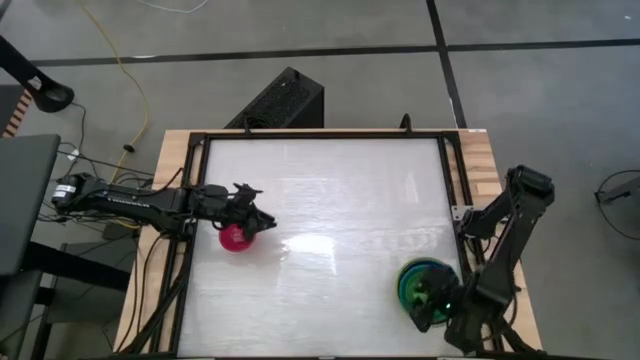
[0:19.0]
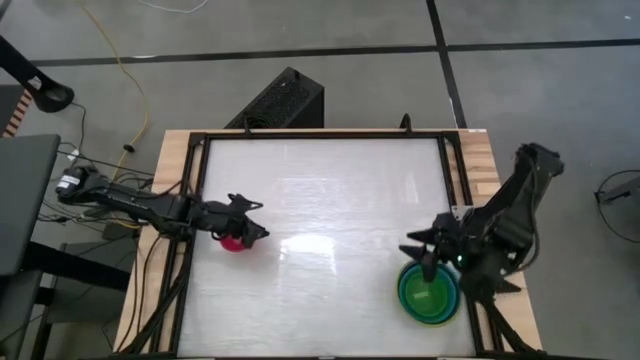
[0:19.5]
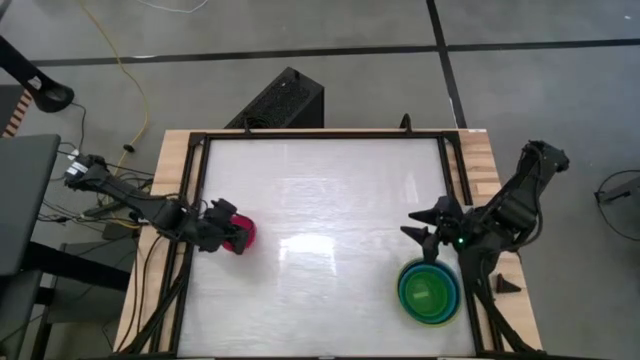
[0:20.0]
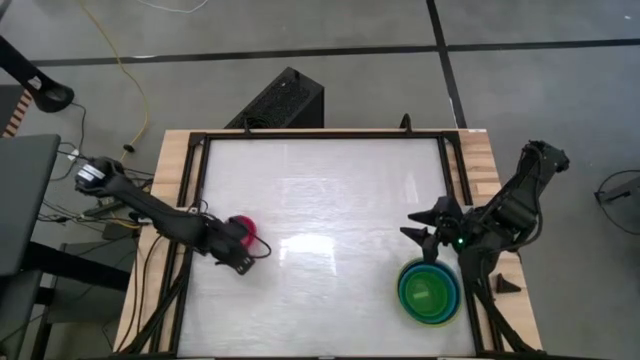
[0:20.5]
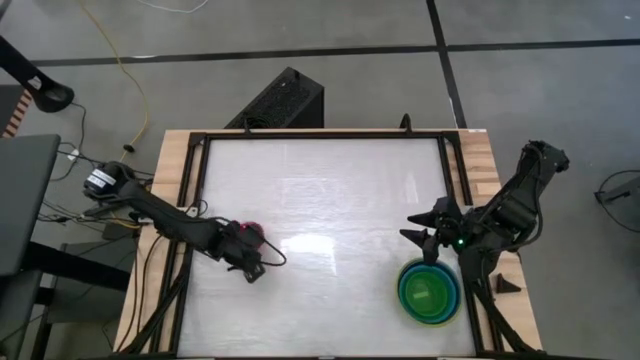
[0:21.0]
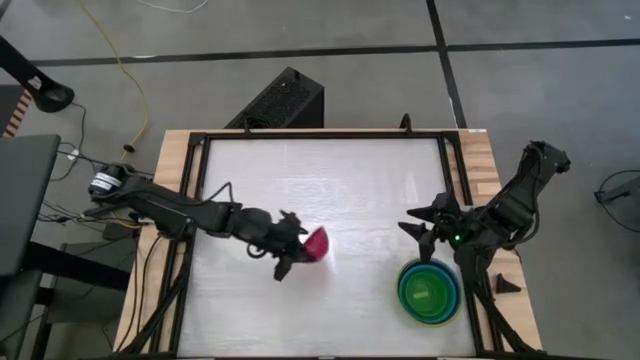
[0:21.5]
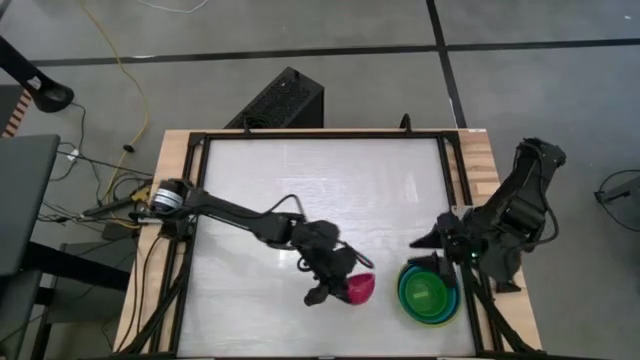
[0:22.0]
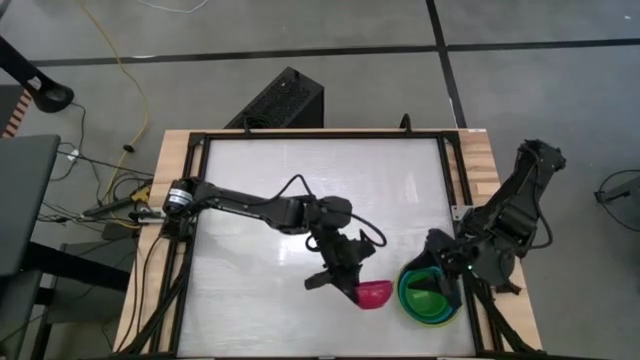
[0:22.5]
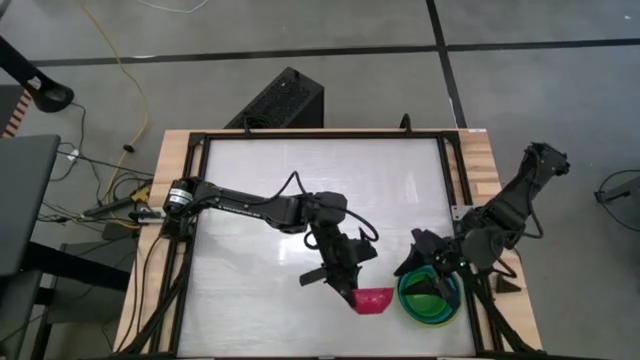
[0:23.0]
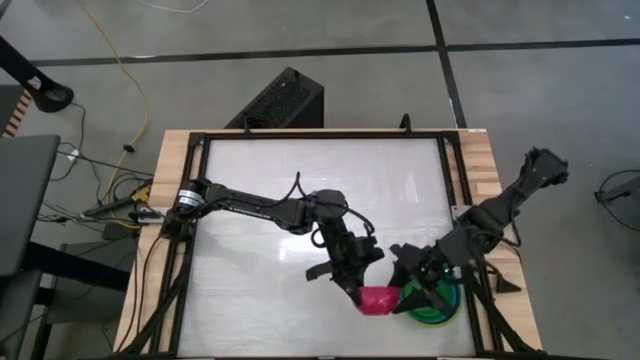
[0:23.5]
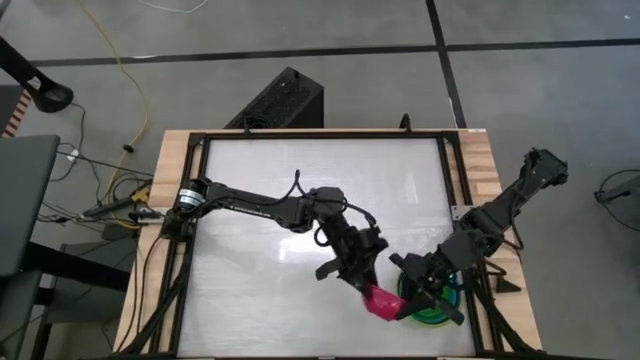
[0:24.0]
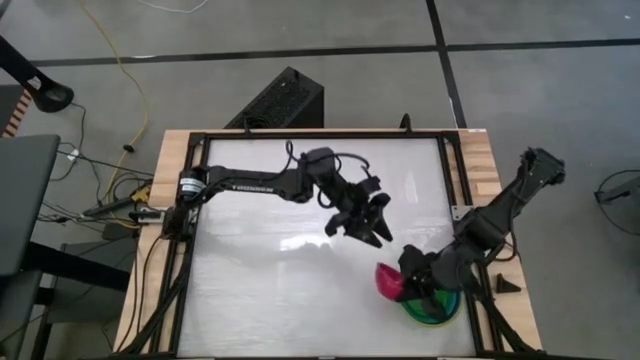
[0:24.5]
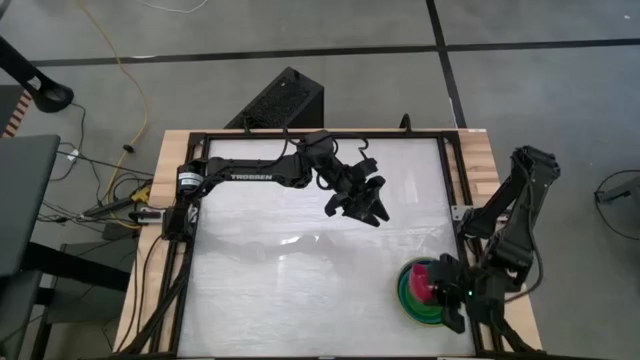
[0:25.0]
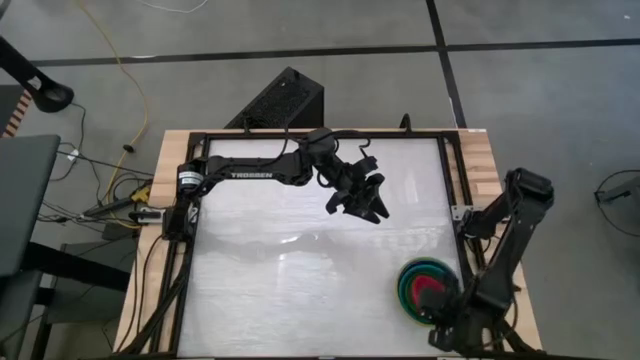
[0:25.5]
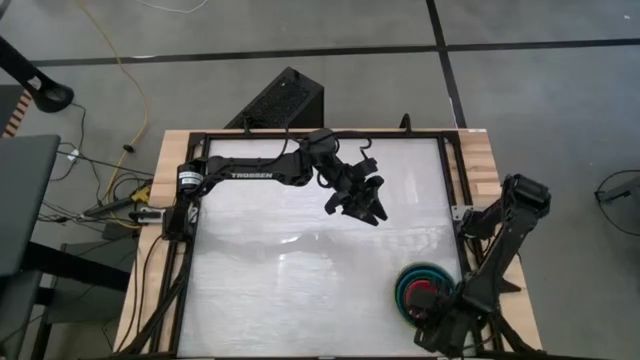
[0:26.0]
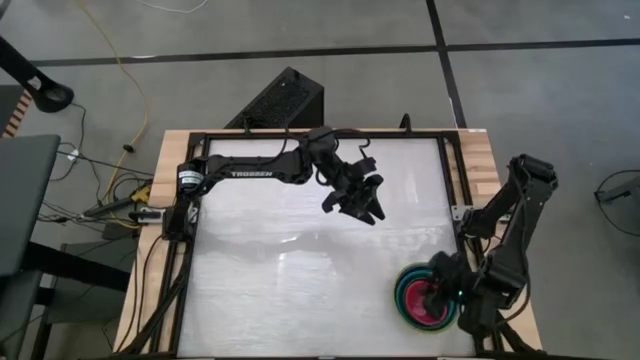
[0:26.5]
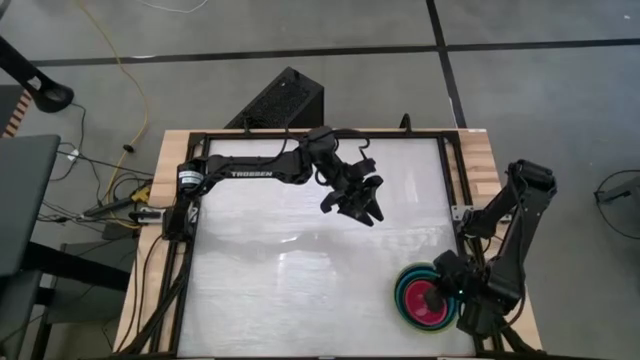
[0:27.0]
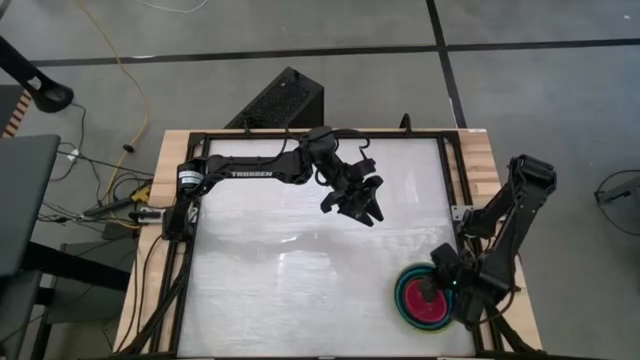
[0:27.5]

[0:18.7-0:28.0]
Stack the red bowl on the green bowl

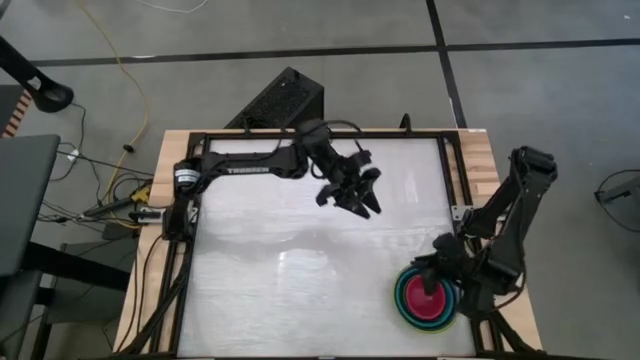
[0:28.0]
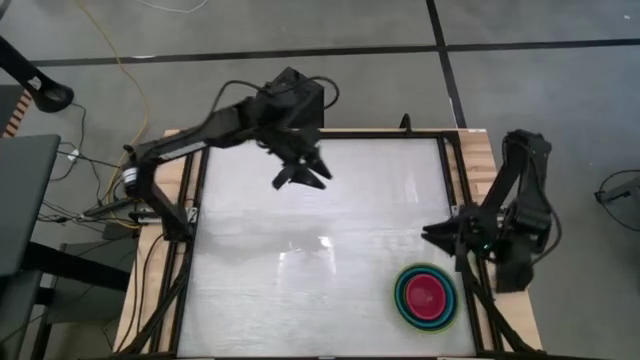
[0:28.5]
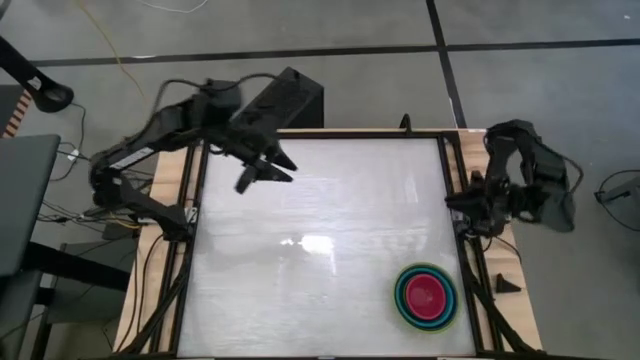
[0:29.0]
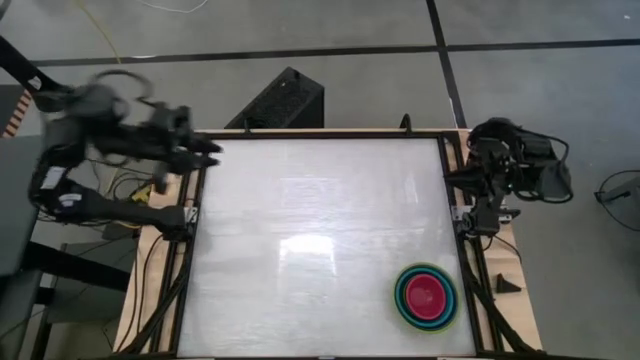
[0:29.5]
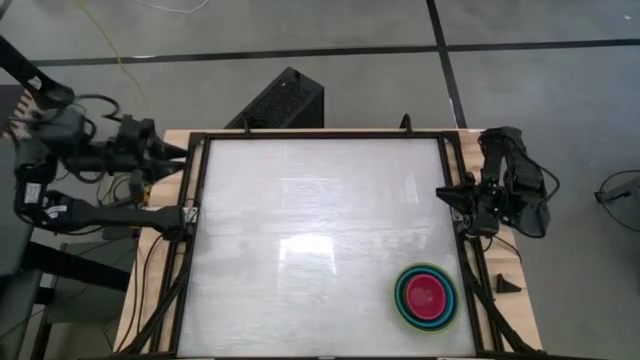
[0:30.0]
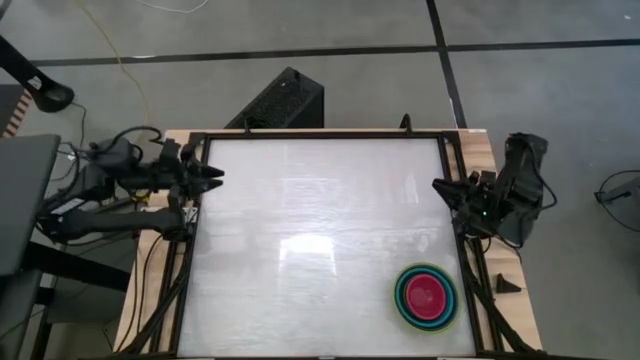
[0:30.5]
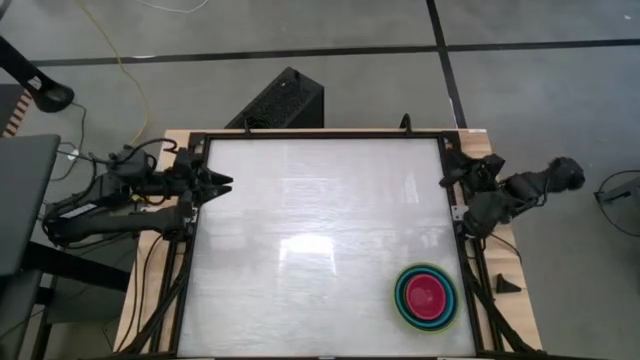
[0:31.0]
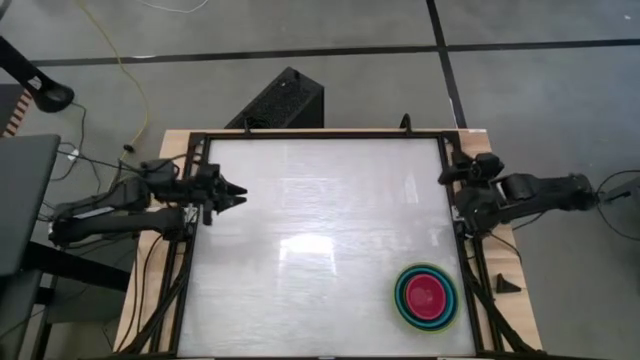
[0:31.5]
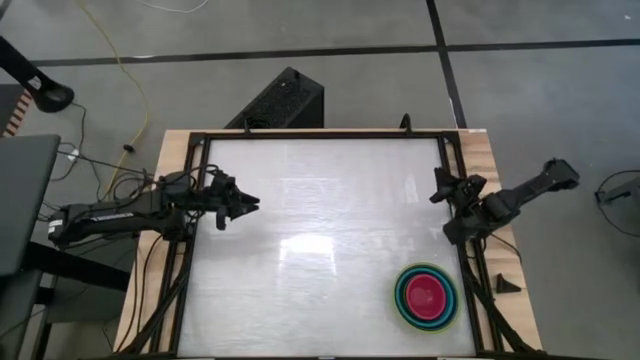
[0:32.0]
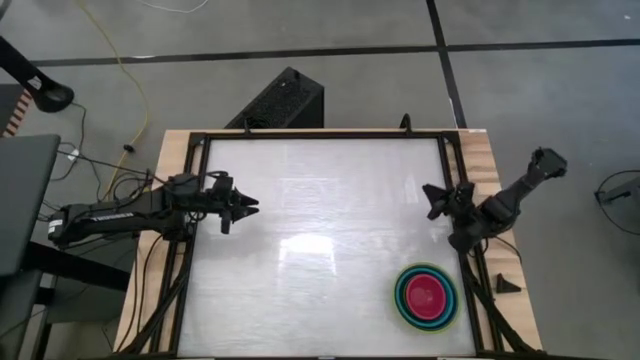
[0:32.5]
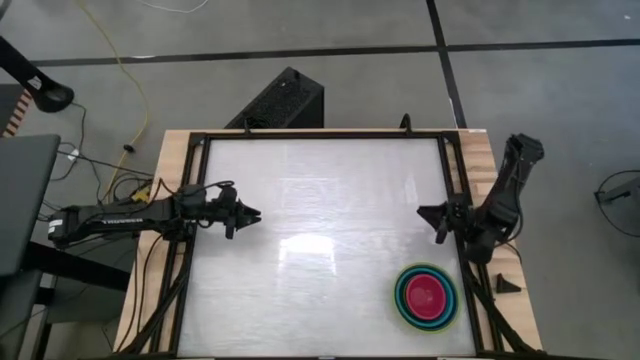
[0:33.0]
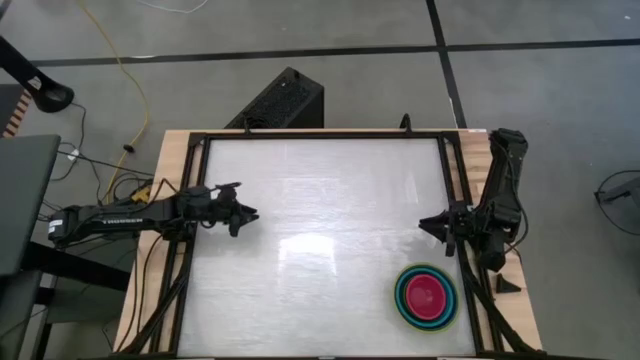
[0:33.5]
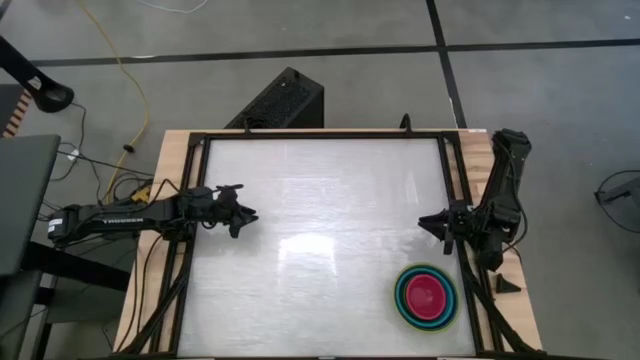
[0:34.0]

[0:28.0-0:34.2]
Return to Home Position
